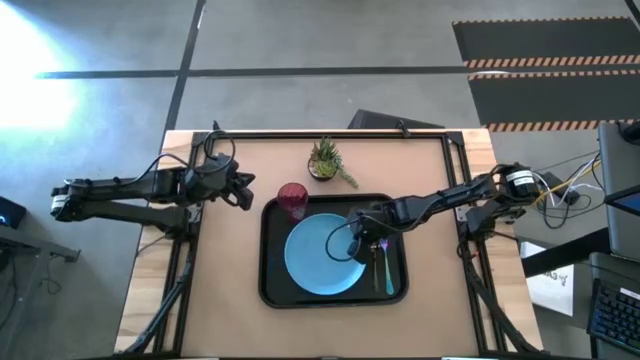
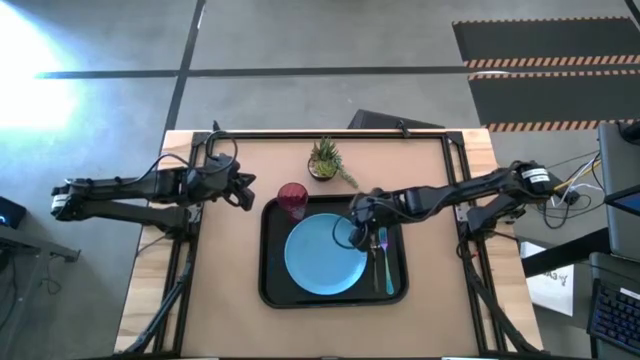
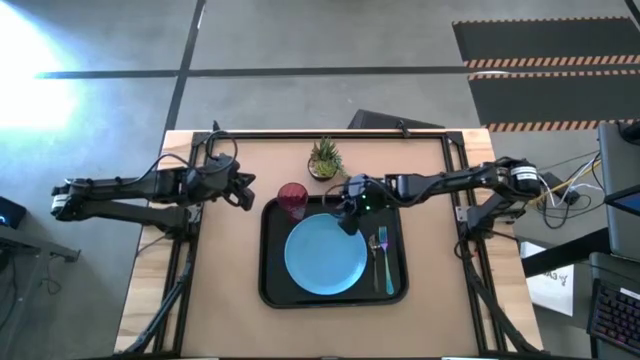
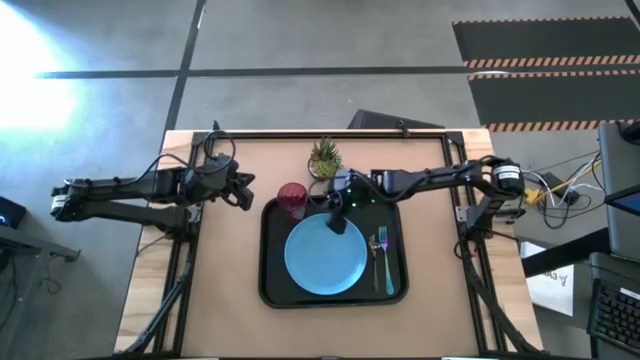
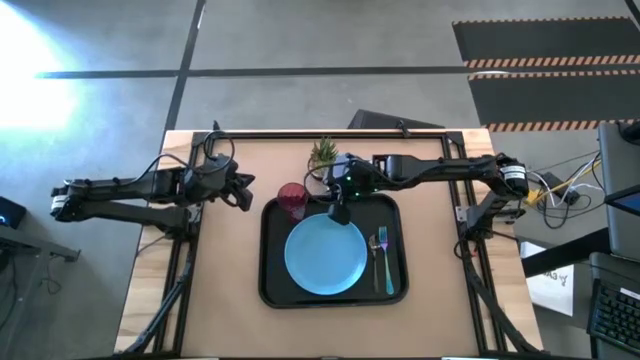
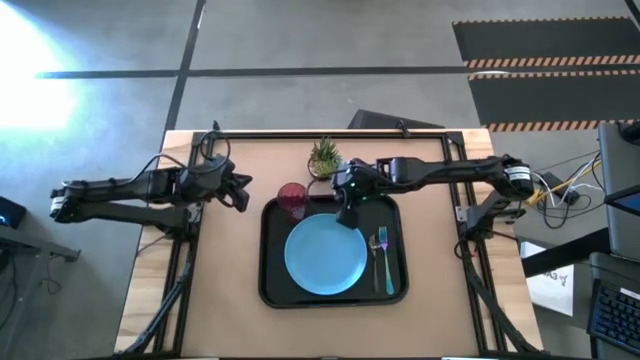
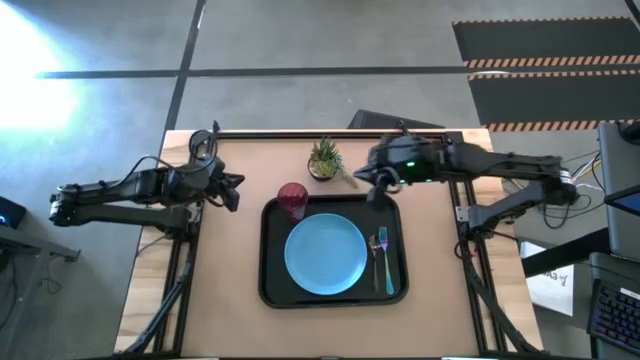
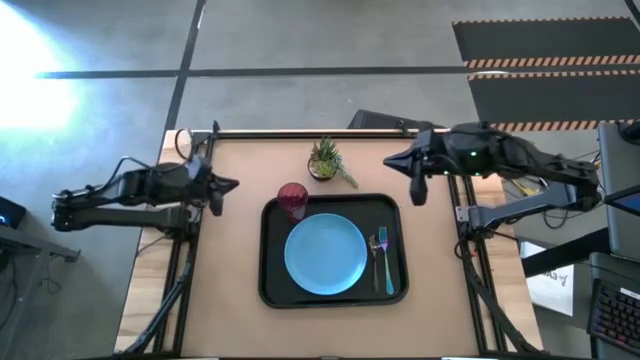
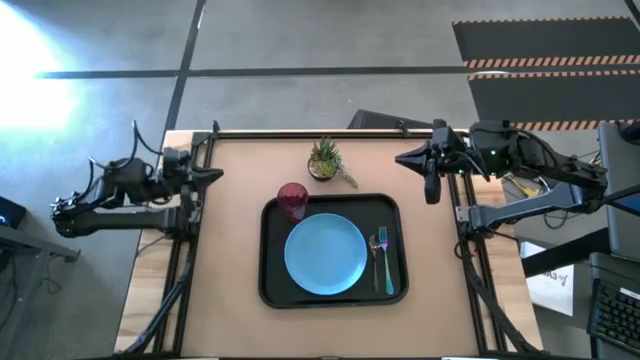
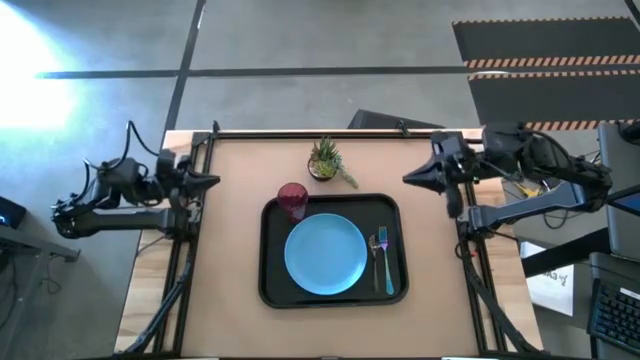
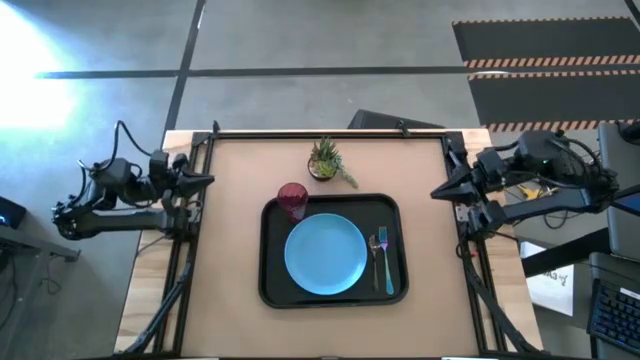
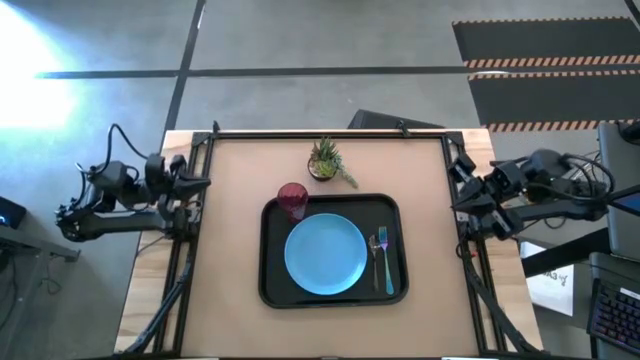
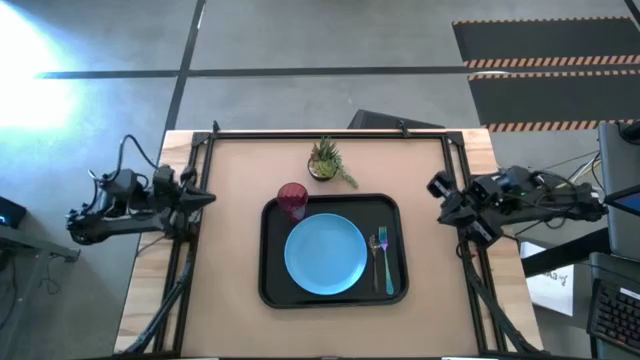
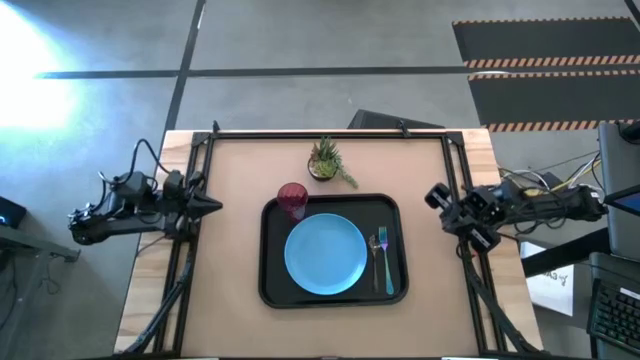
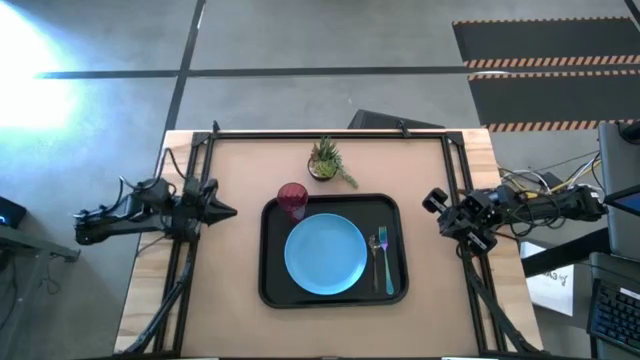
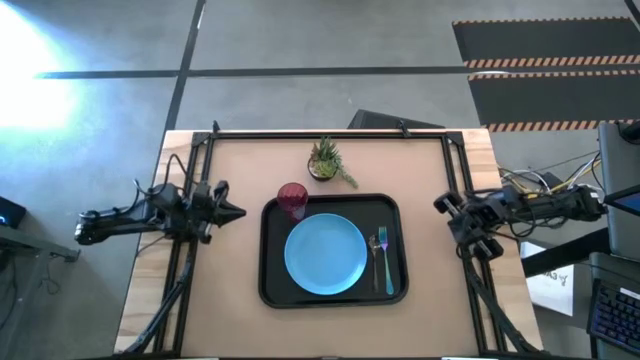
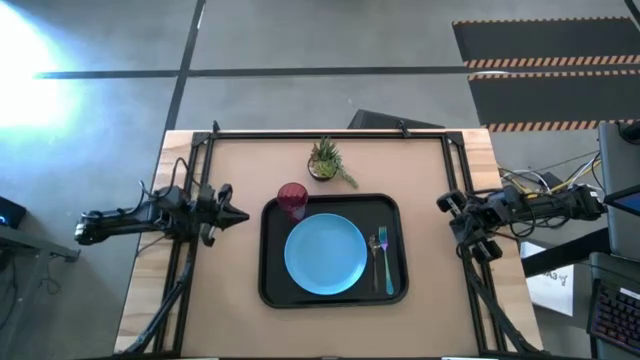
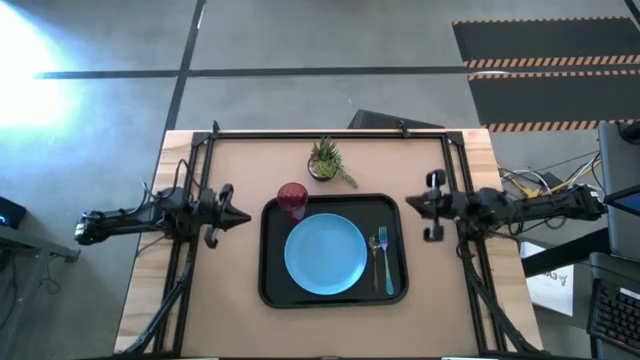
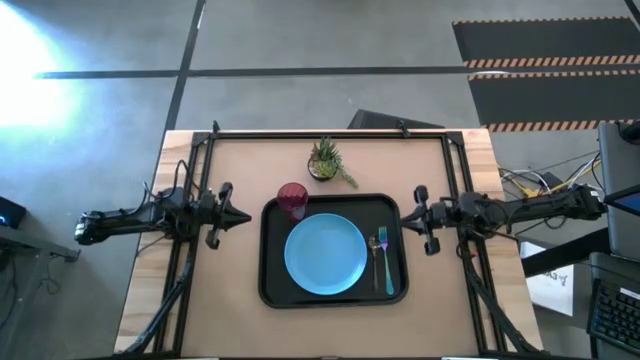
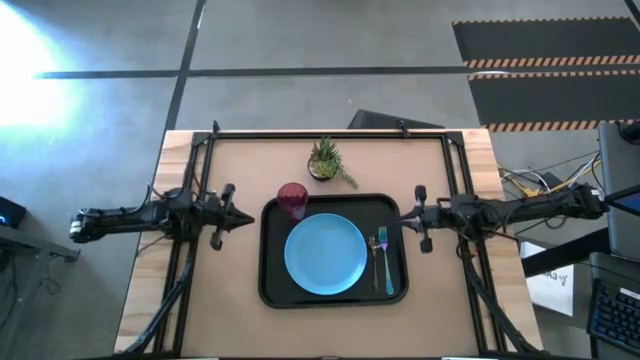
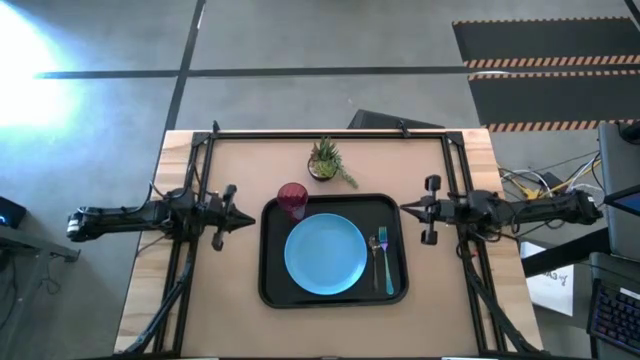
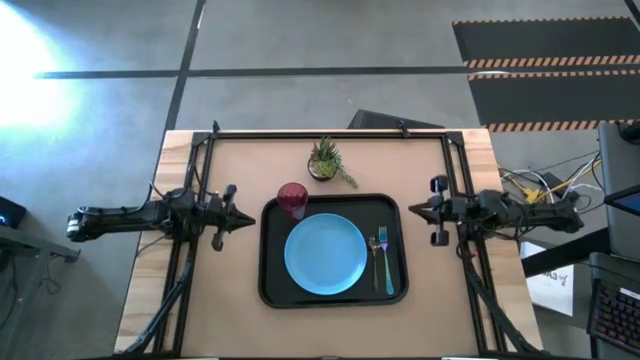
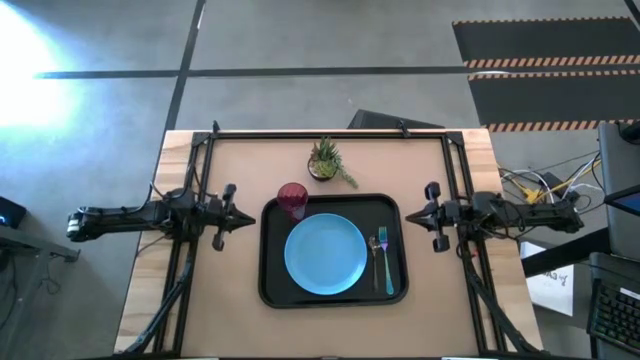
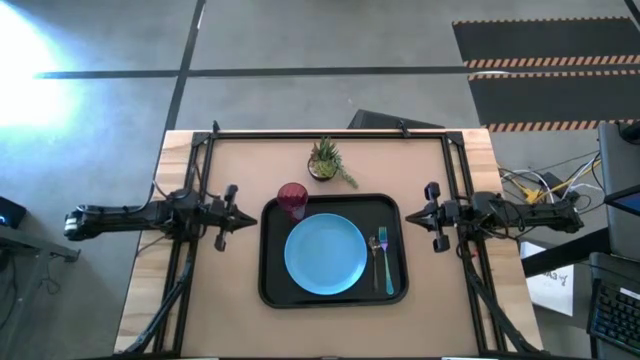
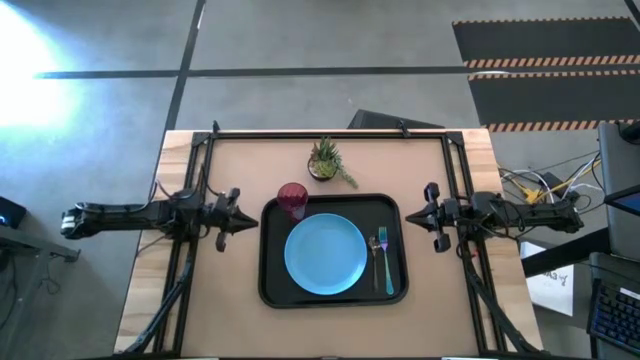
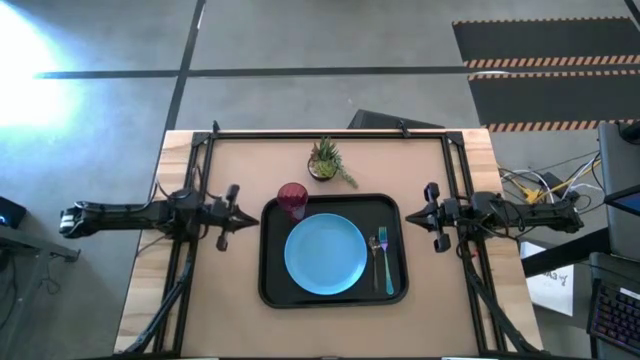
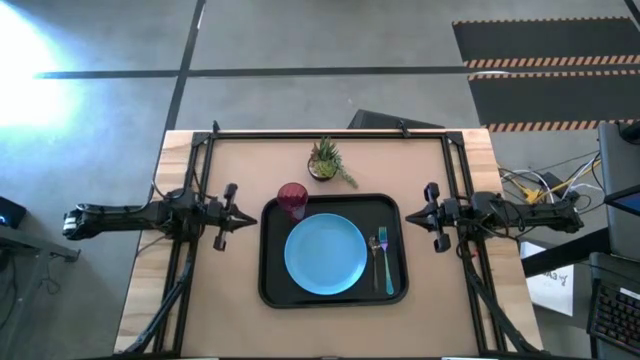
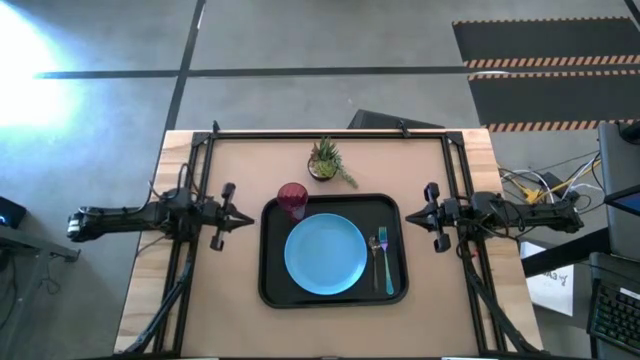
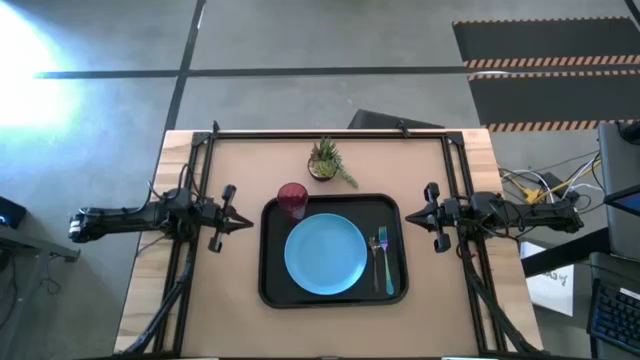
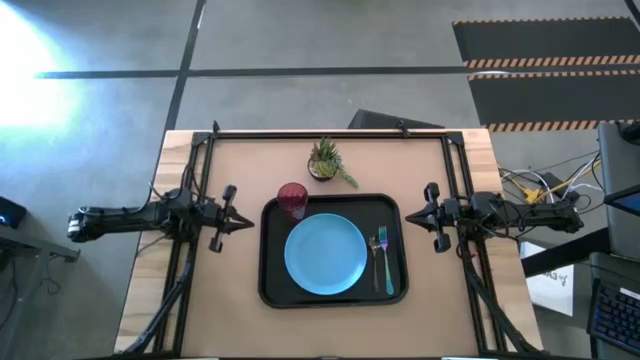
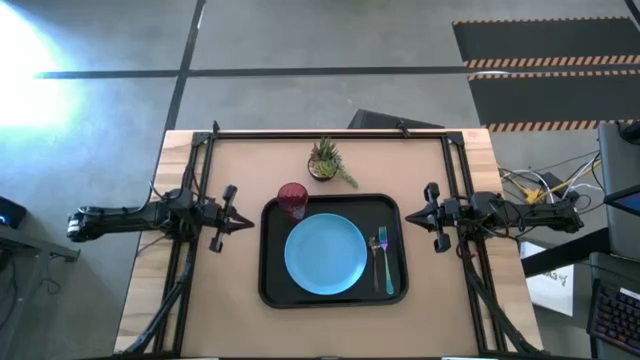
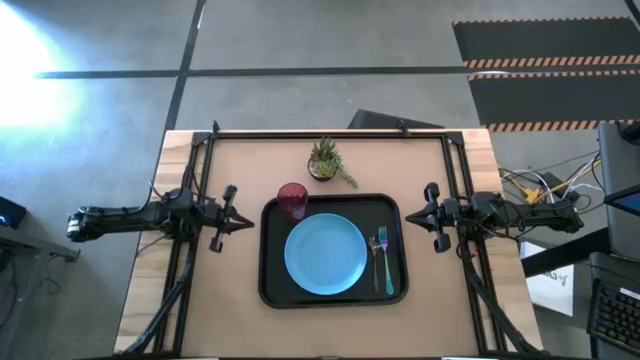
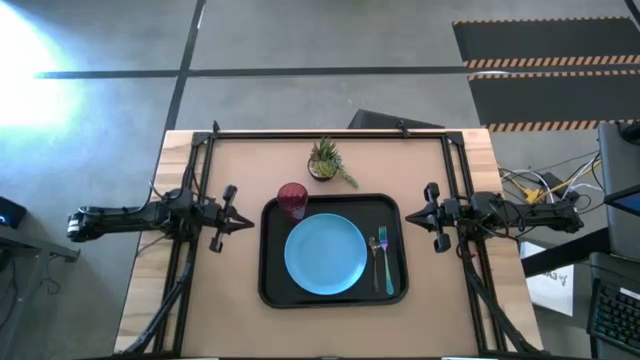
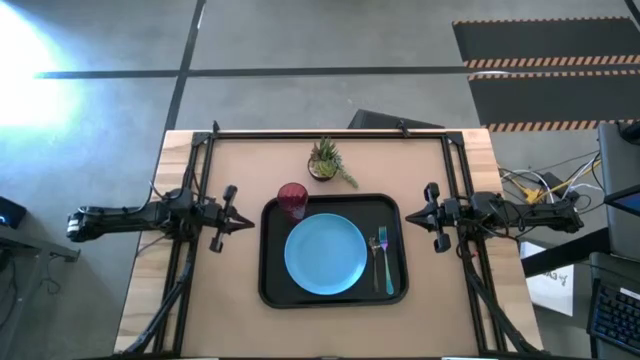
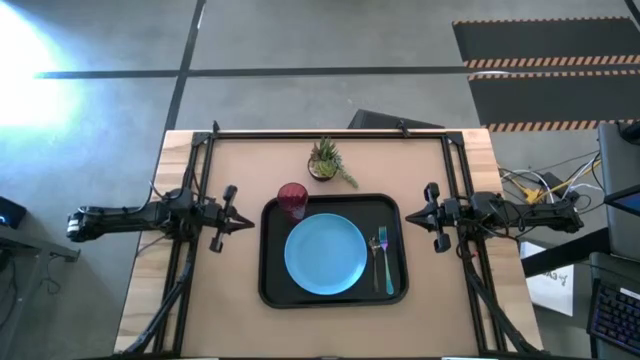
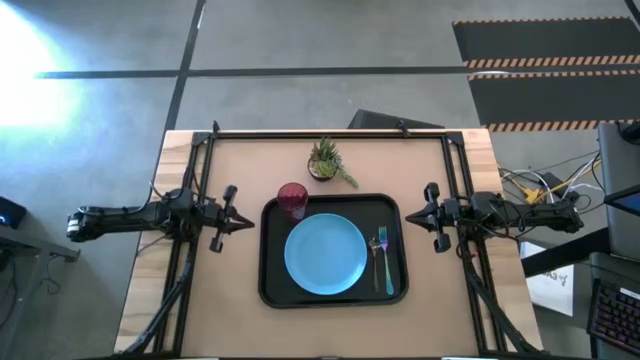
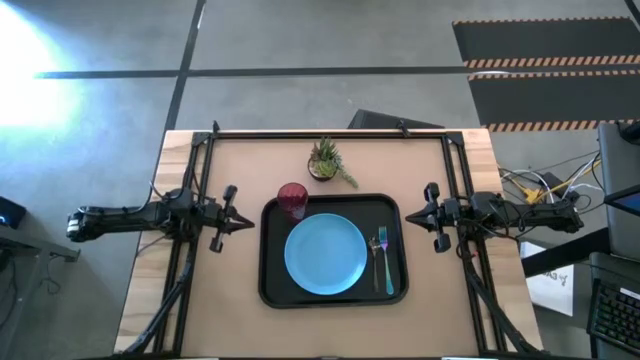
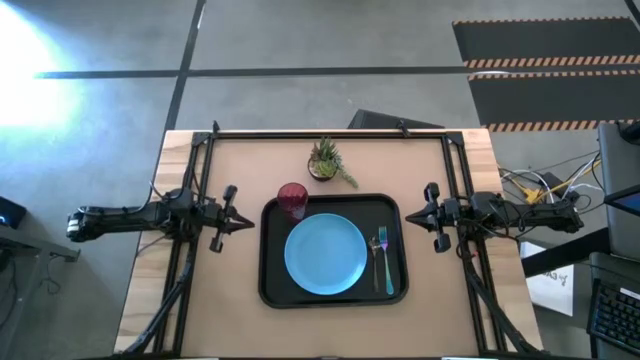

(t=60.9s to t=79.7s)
Task: Pick and place plate/cup/fork/spoon on tray
Return to Home Position
